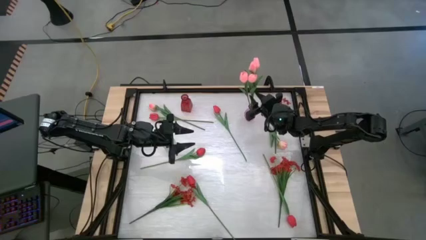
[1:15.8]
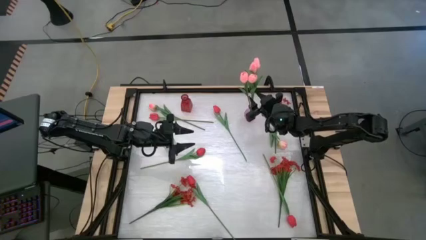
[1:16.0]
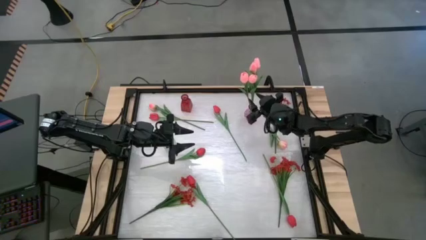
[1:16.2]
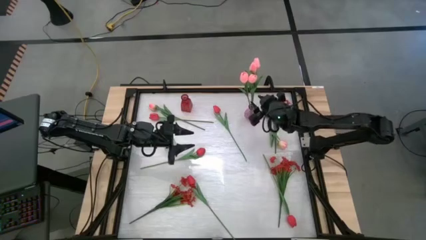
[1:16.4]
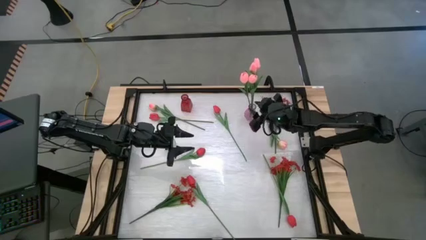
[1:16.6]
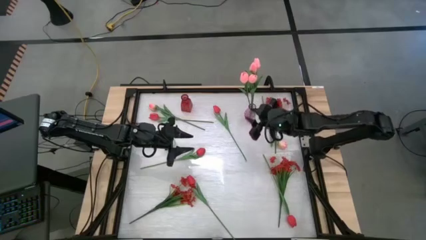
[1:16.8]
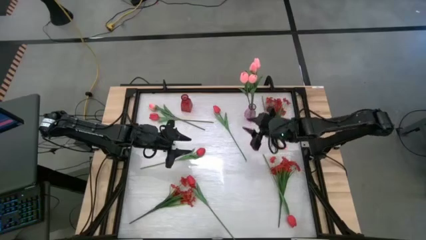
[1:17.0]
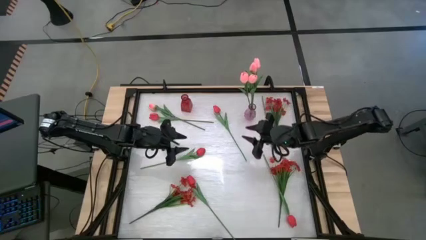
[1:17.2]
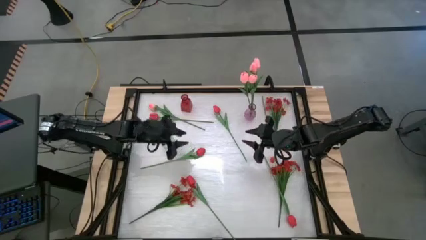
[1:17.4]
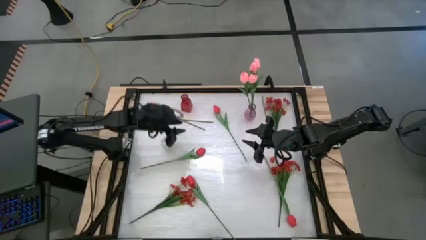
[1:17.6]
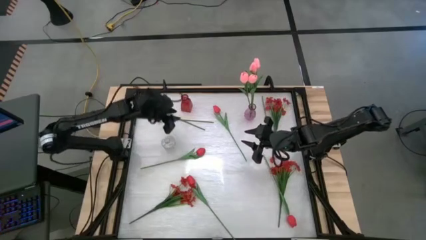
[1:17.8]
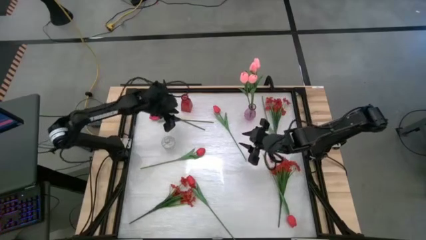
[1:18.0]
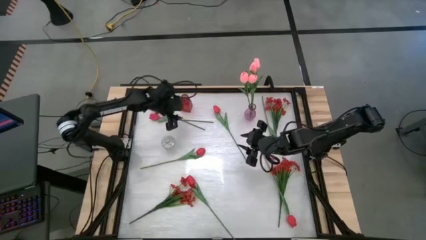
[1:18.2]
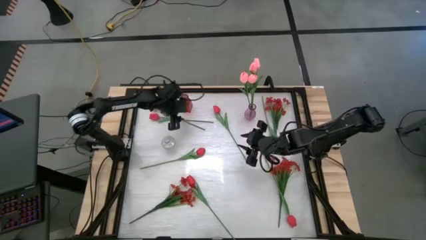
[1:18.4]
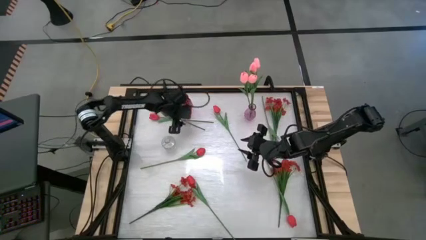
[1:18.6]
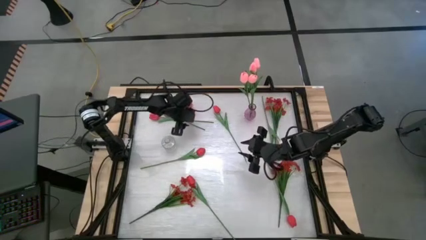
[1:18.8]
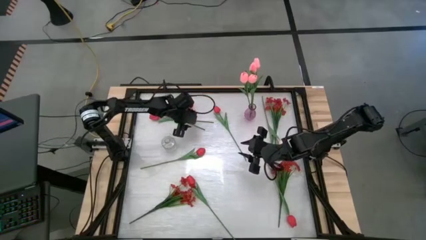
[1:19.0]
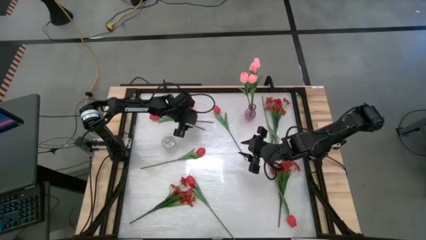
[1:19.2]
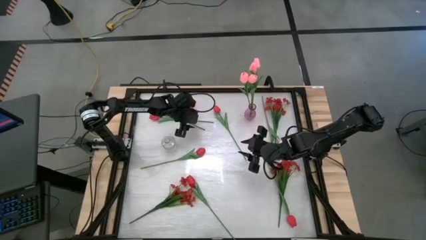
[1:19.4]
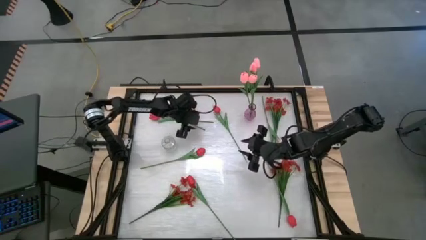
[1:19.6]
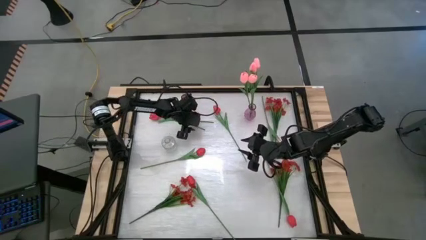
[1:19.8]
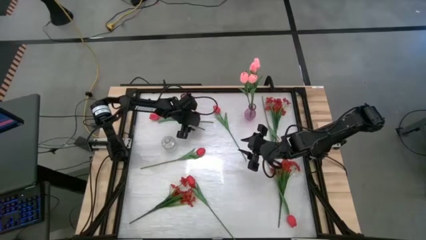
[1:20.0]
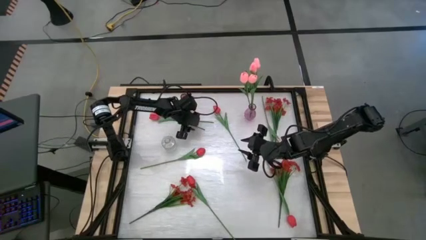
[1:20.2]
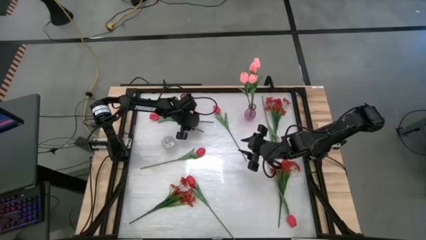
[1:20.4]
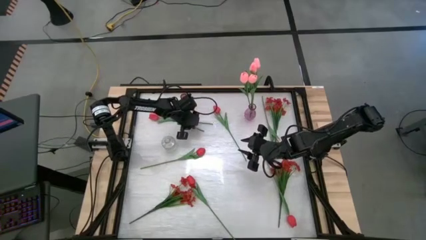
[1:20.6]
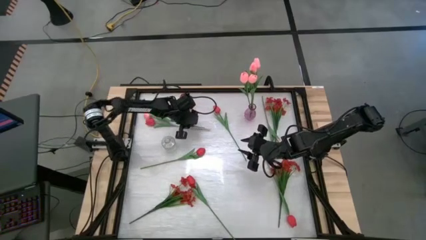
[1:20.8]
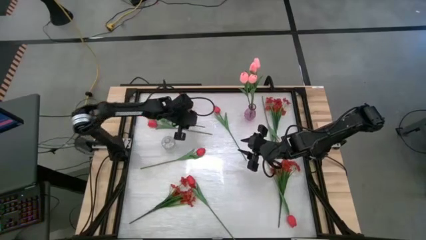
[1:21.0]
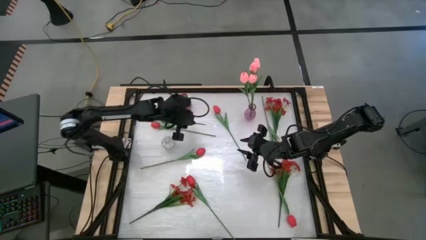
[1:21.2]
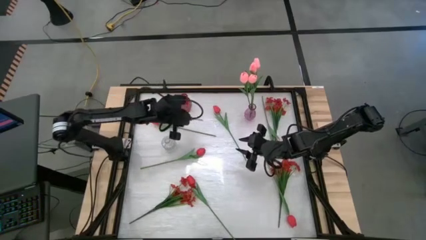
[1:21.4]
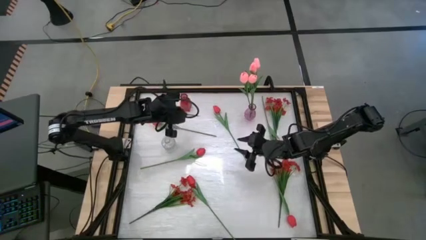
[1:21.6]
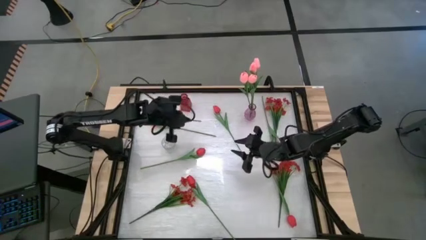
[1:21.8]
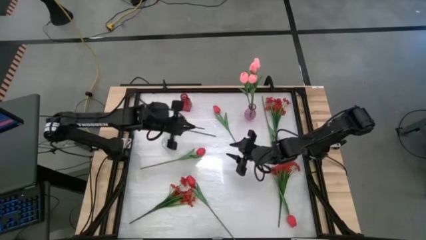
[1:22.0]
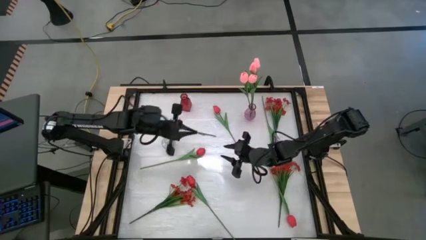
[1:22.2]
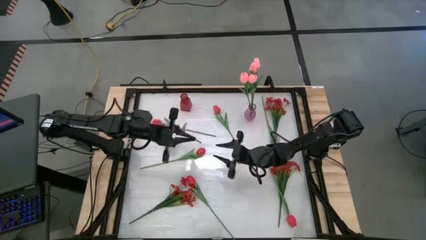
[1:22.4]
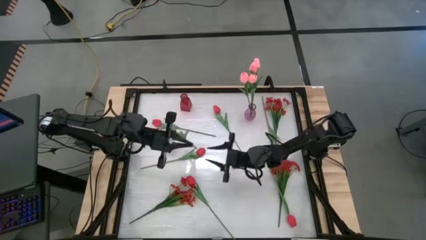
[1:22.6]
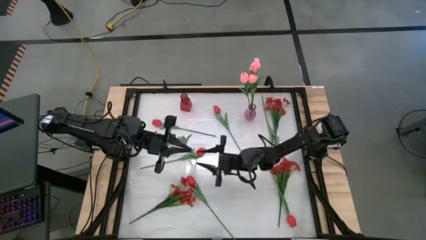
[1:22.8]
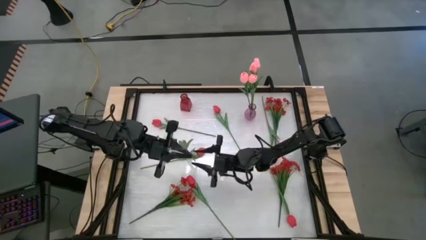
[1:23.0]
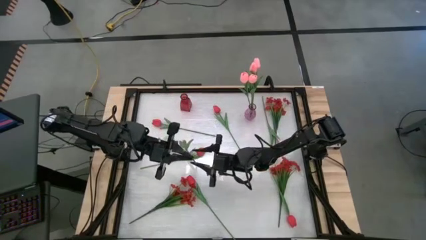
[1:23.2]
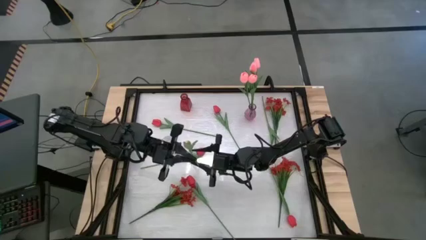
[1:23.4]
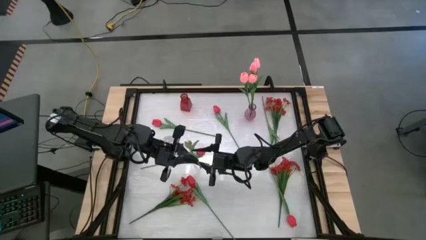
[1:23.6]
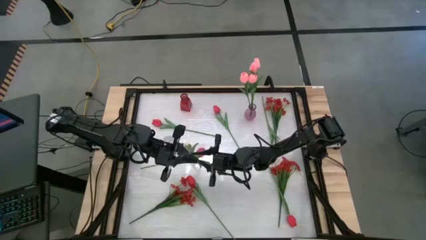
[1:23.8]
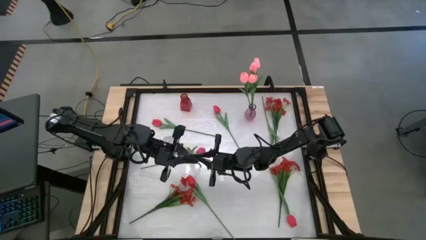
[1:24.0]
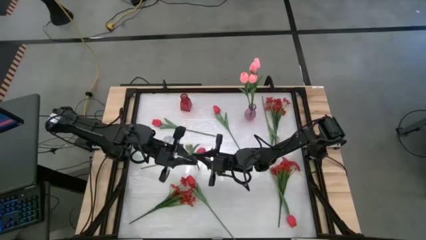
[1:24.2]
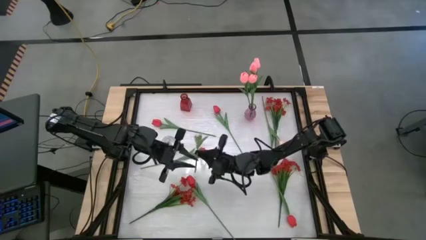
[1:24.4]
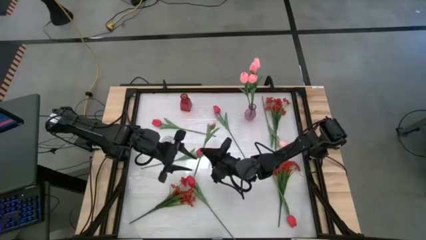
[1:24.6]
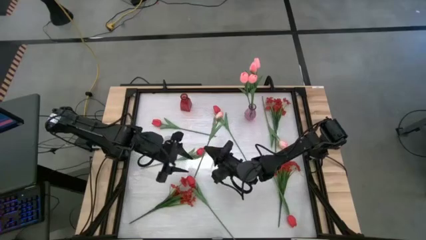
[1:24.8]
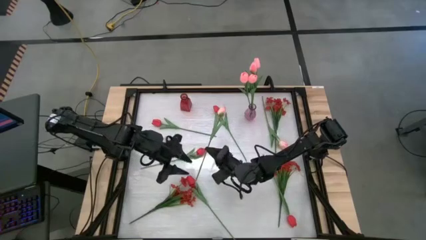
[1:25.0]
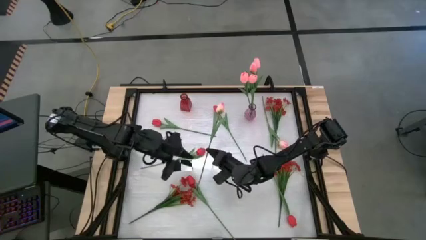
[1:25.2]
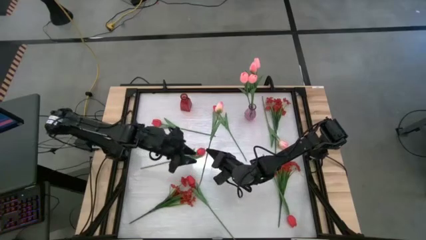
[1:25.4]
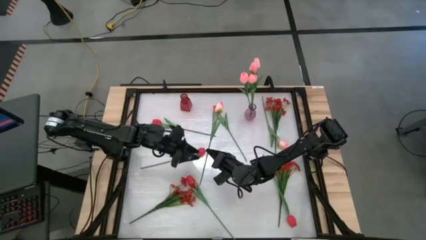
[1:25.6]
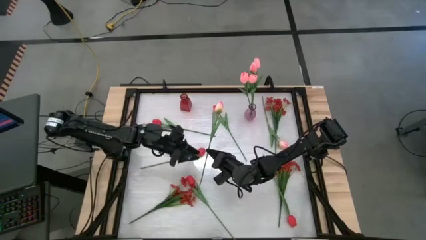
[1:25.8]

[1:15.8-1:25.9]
Task: Sort flowers into vase by color
Put the pink tulip into the purple vase

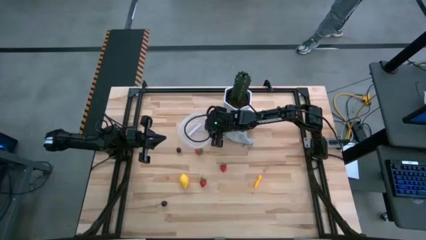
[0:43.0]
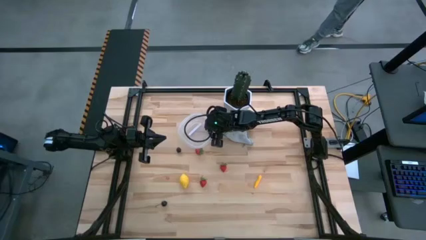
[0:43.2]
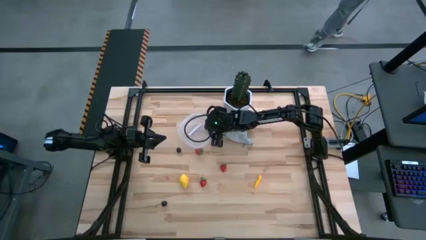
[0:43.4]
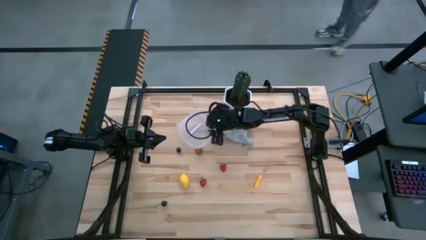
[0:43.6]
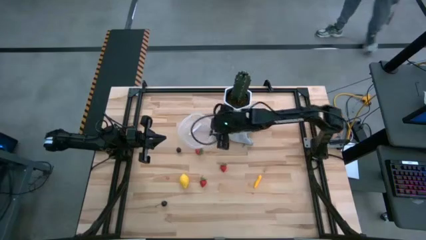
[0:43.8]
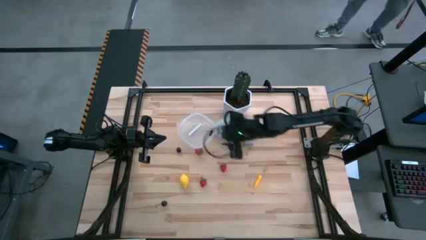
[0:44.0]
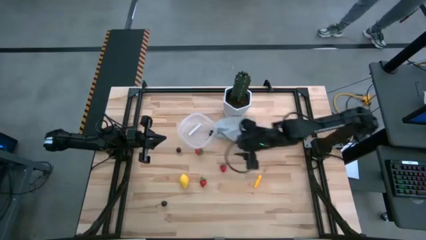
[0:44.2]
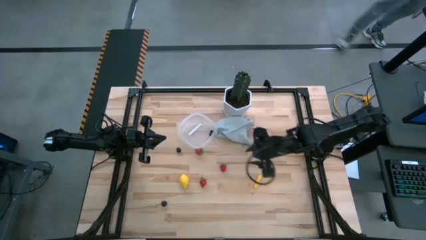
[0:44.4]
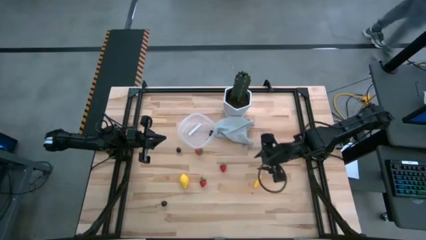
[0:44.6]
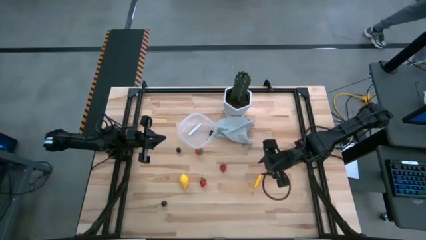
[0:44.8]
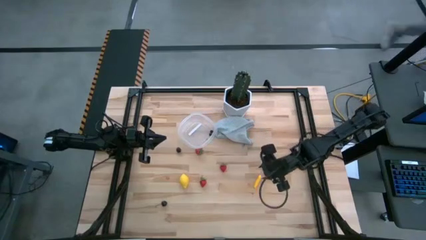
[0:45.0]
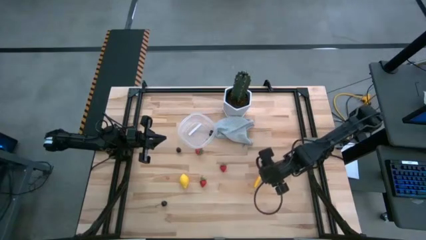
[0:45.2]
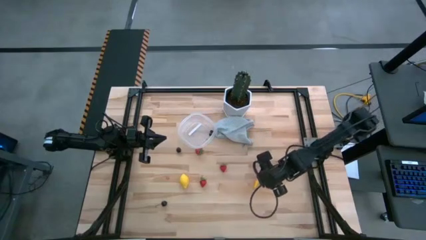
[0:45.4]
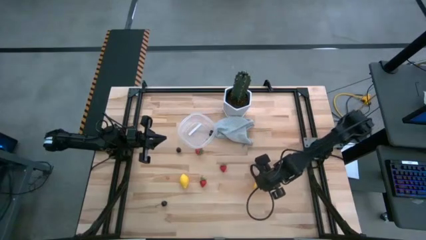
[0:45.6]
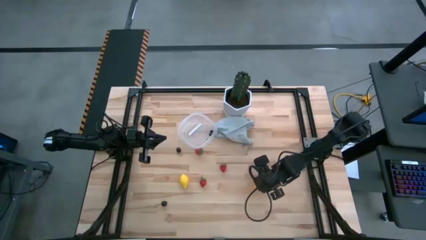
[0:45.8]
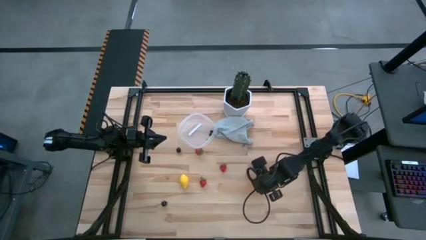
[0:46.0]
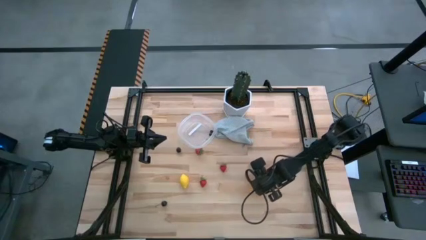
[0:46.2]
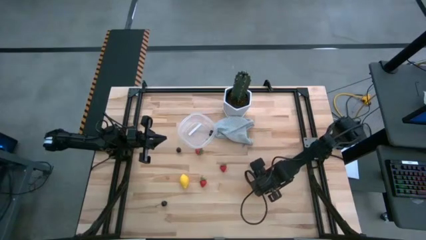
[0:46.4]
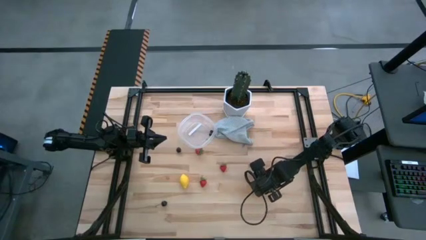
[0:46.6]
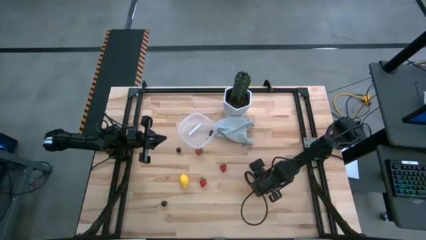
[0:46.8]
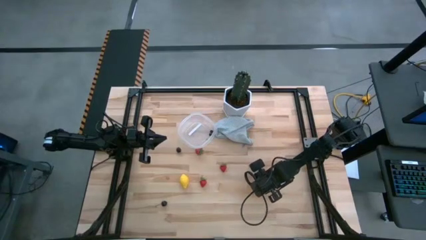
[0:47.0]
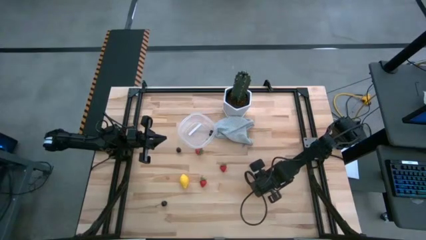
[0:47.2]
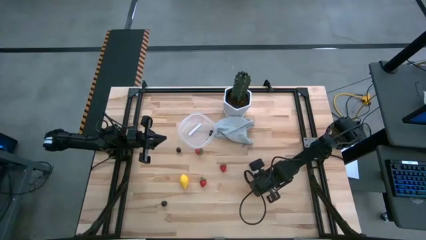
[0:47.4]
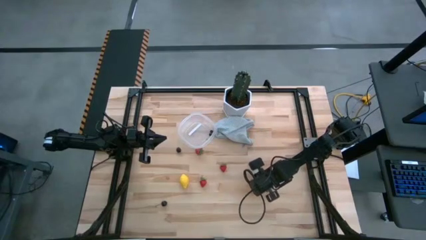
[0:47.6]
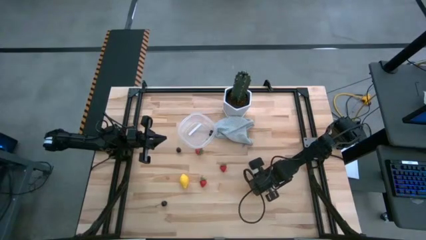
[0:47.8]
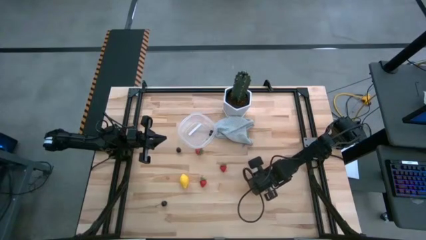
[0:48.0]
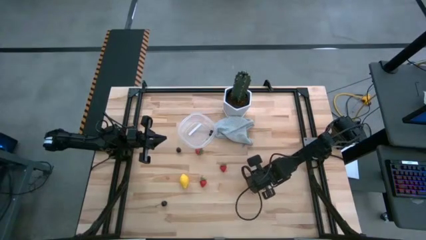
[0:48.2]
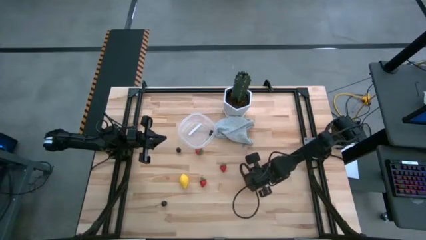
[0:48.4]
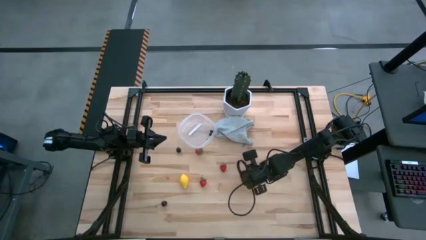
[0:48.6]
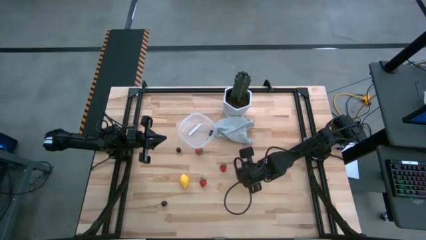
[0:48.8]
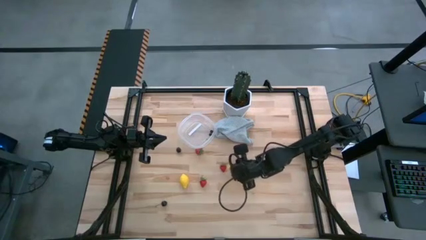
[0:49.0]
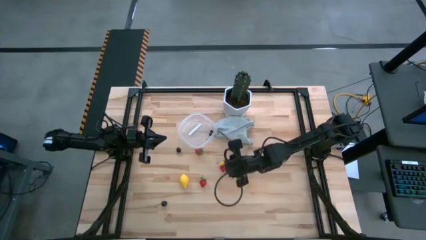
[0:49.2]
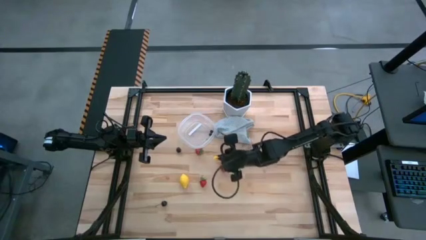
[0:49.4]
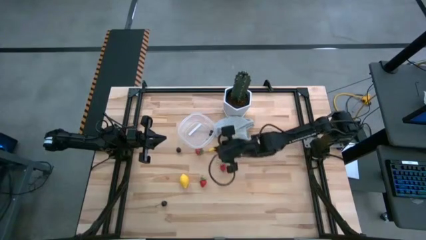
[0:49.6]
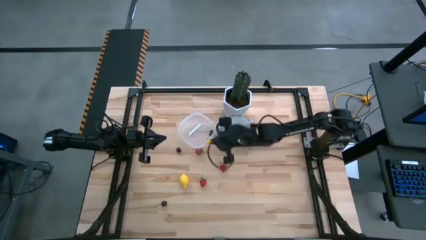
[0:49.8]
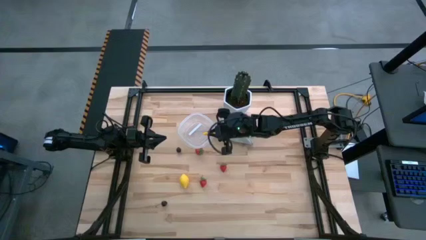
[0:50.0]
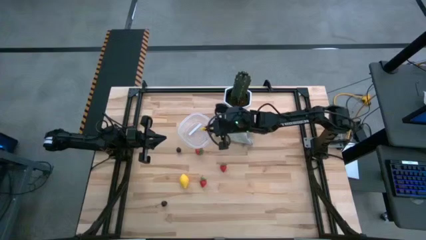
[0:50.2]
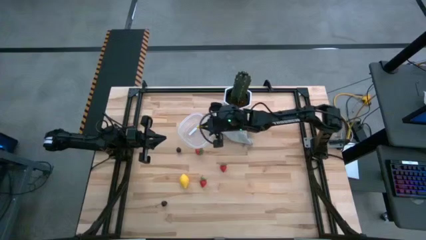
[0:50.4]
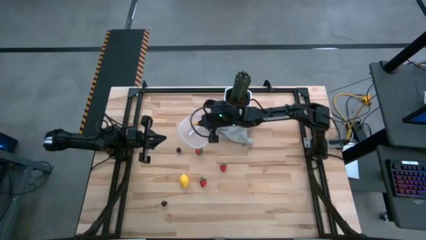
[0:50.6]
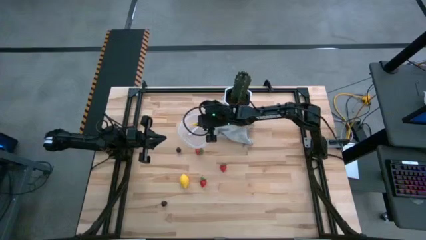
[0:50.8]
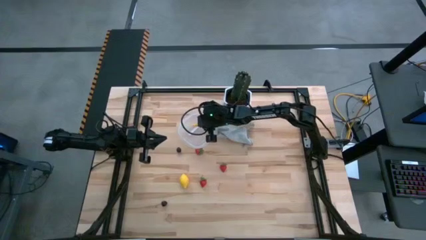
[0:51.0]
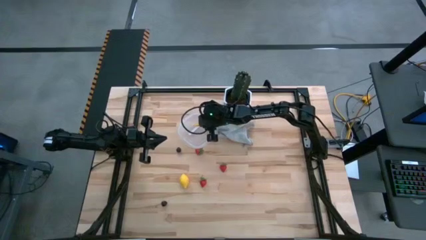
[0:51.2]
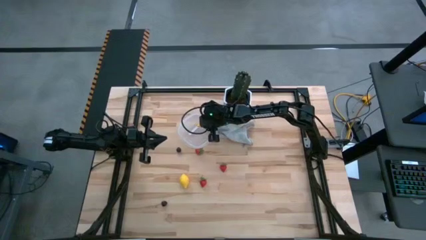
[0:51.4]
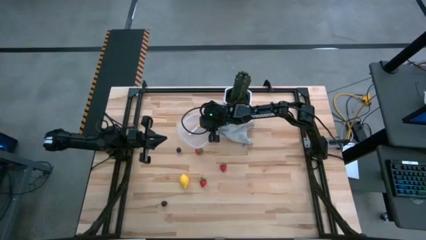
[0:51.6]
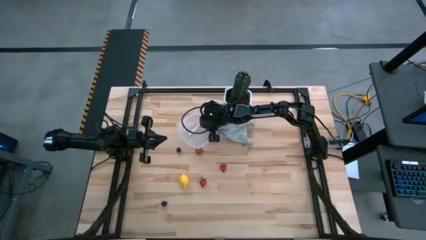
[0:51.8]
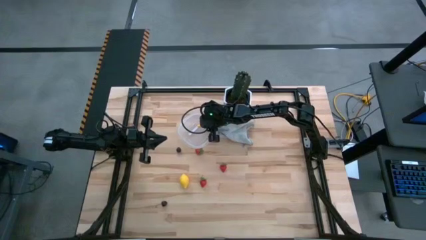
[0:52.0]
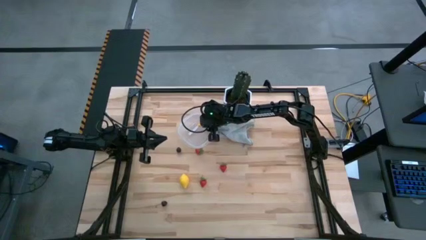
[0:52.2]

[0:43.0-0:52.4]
Task: Pick and placing Produce into tupperware
Put the corn into the transparent bin
